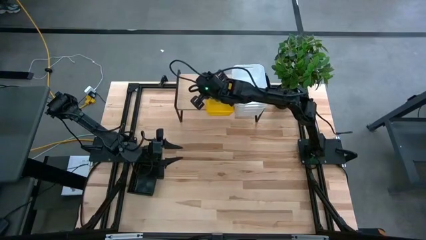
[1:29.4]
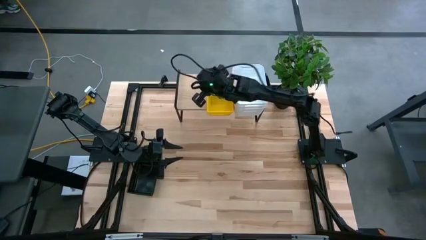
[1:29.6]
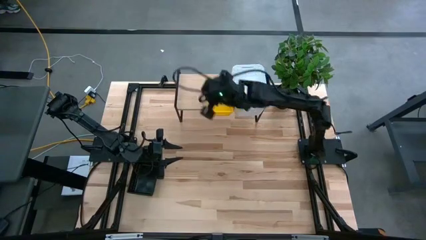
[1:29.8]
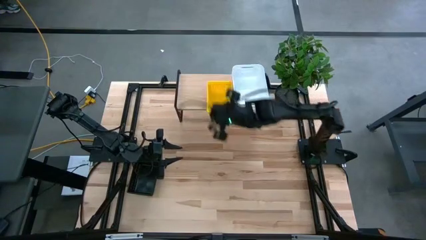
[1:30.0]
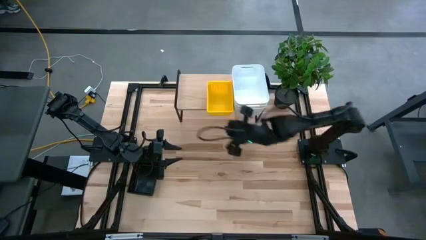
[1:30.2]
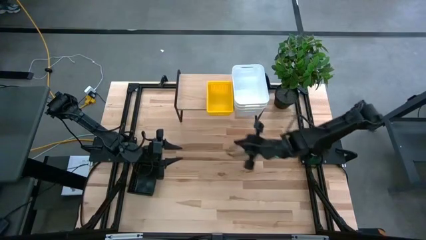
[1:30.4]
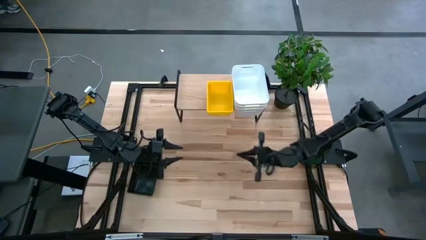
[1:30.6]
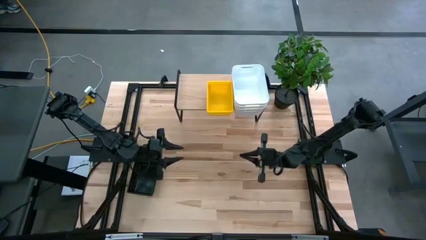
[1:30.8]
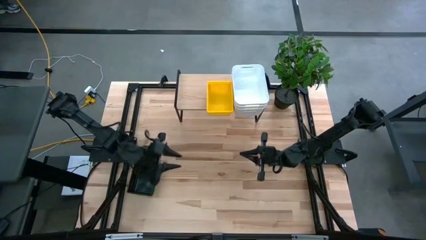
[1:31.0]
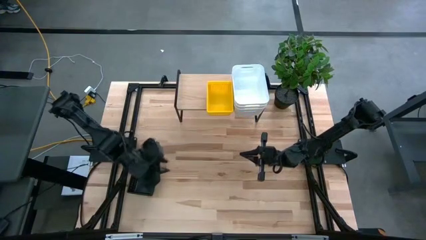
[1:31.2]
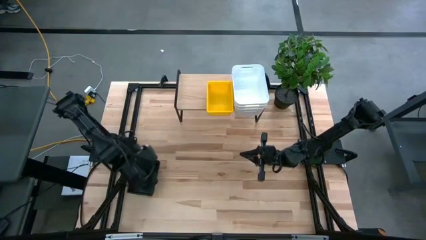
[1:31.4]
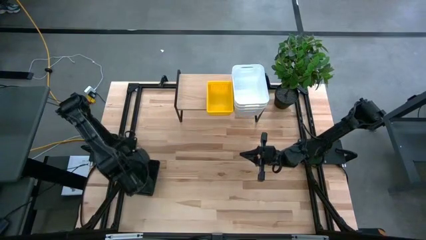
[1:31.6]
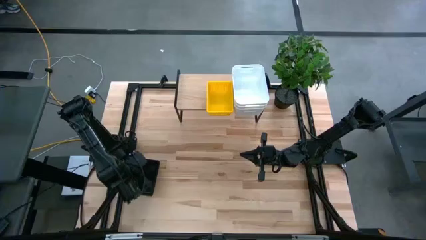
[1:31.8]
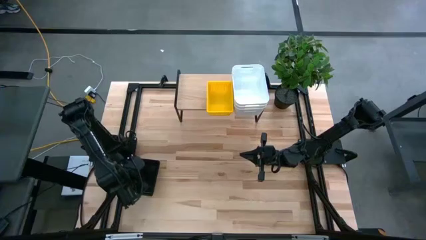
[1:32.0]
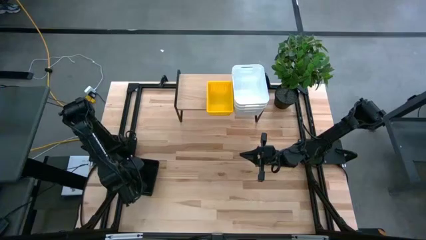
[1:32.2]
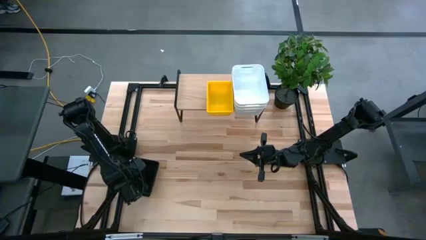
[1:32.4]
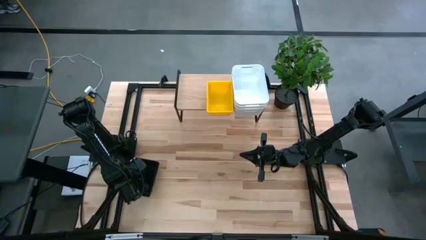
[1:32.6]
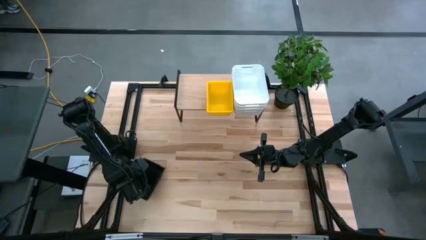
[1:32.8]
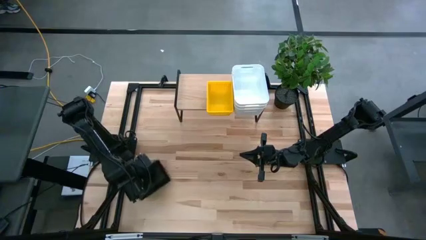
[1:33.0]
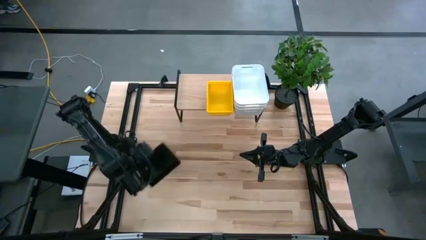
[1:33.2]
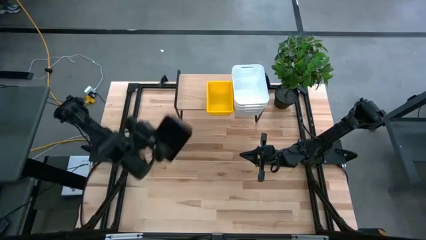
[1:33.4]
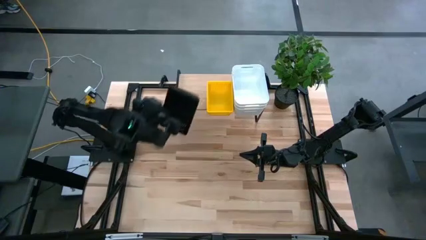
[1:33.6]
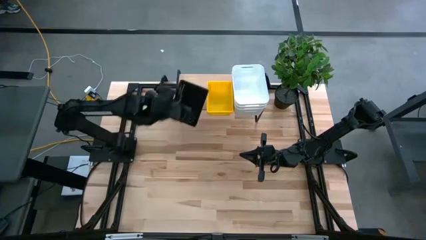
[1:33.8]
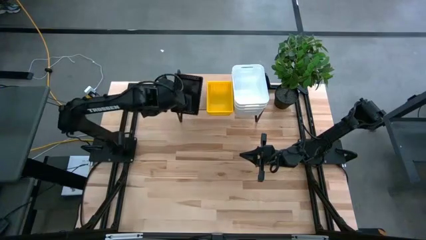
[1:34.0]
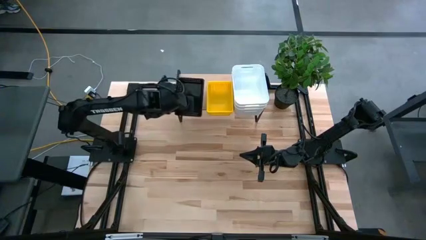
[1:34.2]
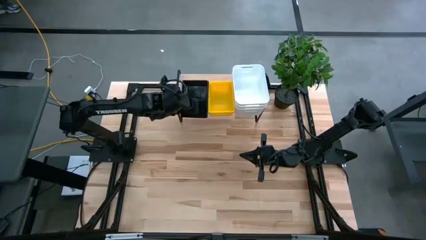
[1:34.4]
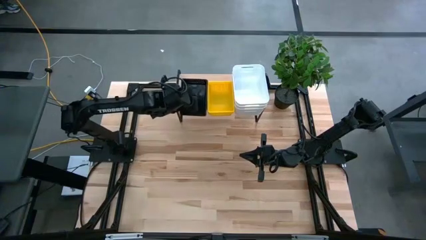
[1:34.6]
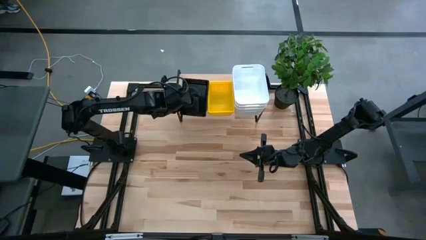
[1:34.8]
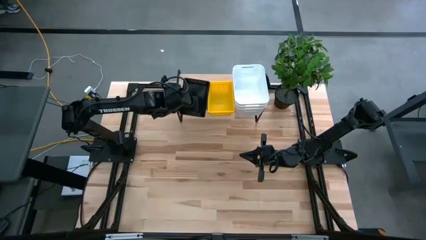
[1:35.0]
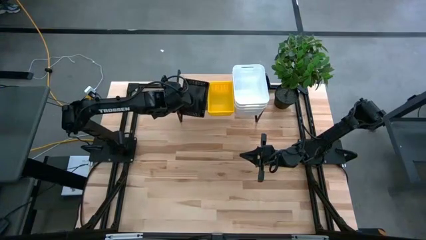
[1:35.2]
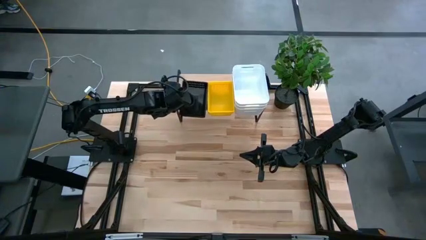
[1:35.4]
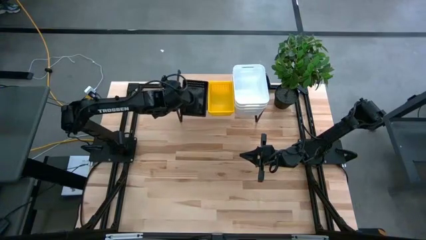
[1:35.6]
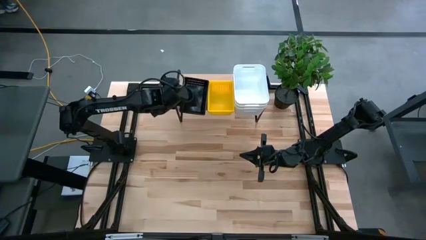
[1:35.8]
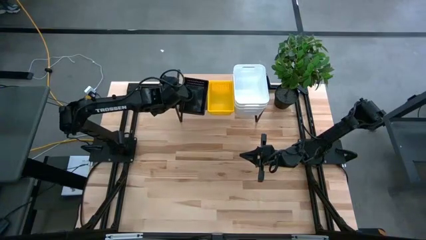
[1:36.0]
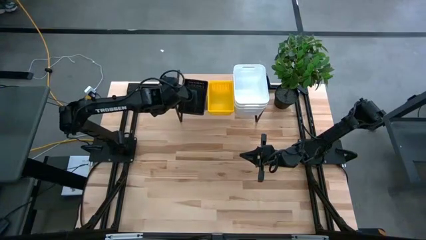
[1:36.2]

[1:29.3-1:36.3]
Task: Stack baskets on shelf by color
Put the stacked black bins on the shelf

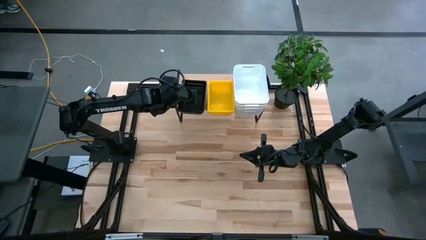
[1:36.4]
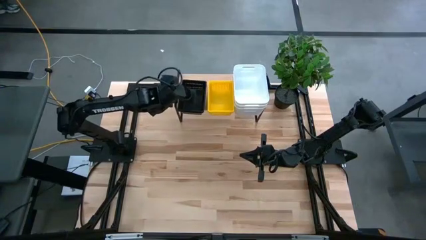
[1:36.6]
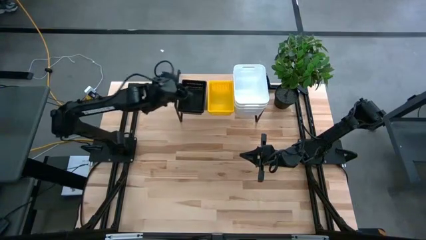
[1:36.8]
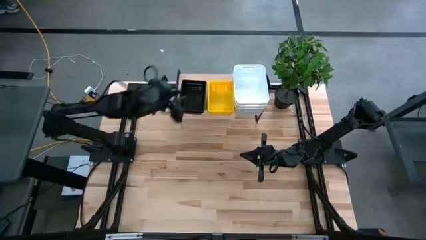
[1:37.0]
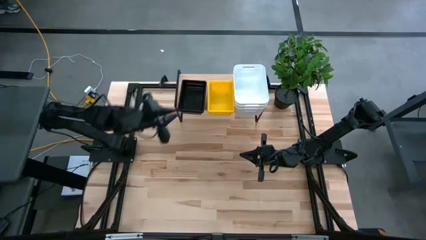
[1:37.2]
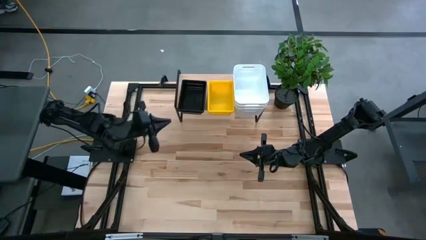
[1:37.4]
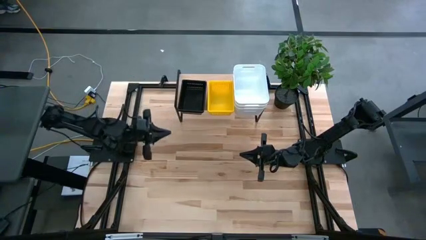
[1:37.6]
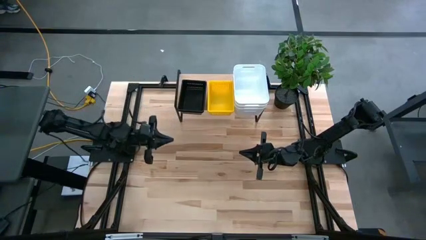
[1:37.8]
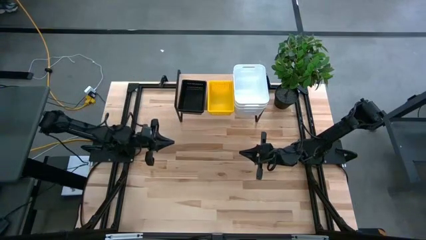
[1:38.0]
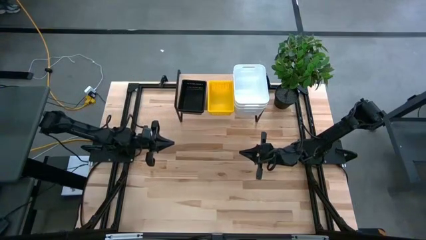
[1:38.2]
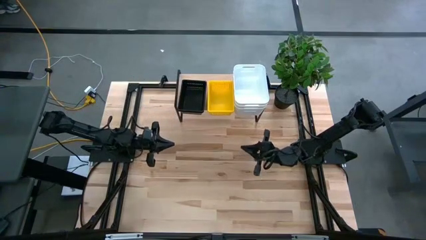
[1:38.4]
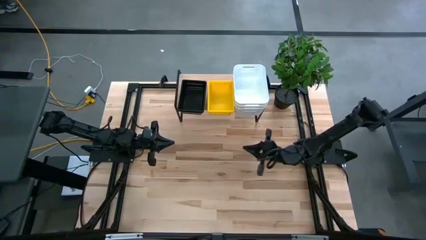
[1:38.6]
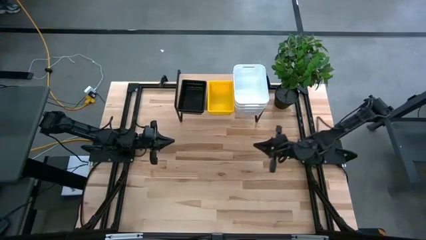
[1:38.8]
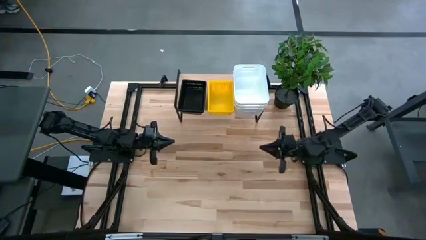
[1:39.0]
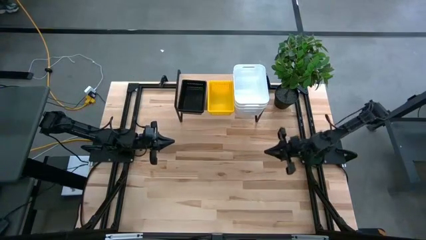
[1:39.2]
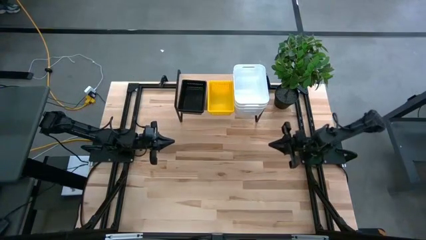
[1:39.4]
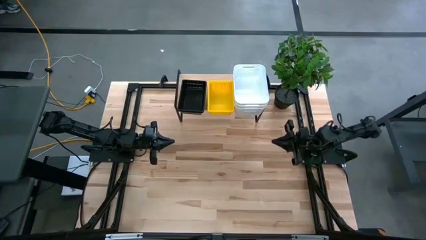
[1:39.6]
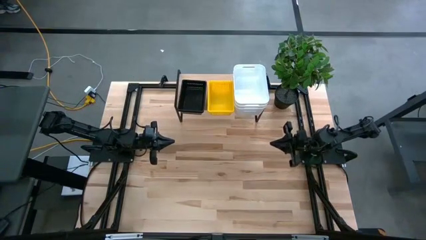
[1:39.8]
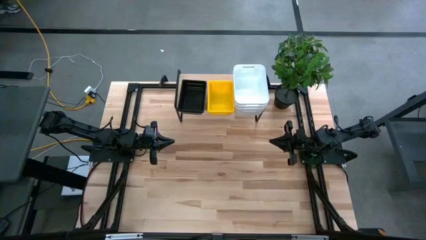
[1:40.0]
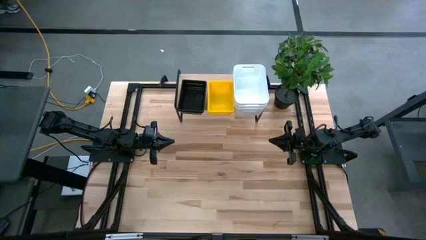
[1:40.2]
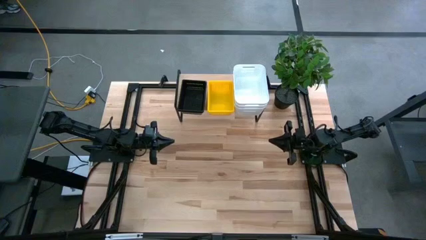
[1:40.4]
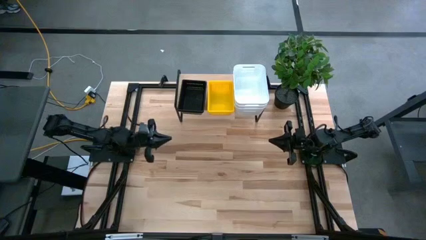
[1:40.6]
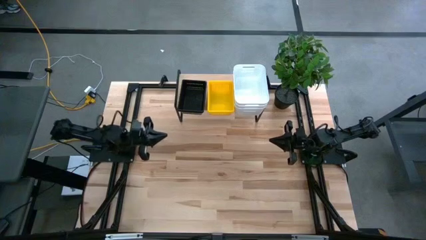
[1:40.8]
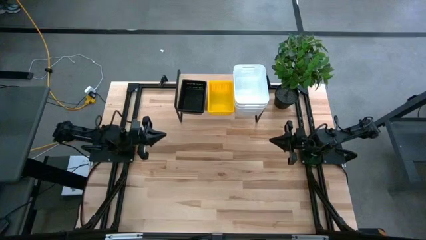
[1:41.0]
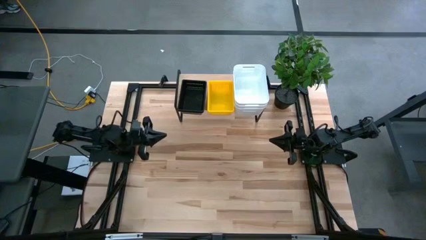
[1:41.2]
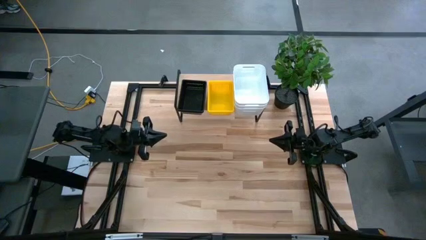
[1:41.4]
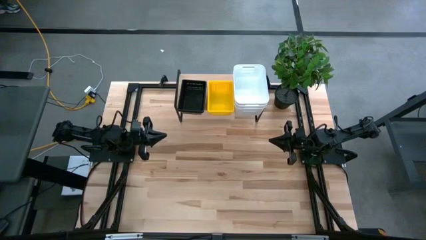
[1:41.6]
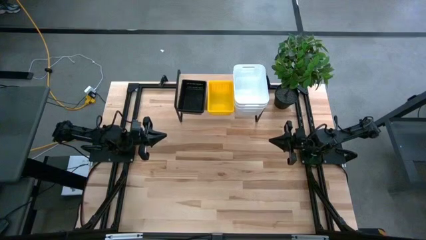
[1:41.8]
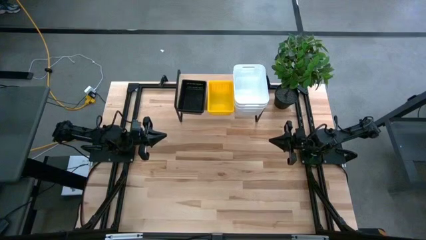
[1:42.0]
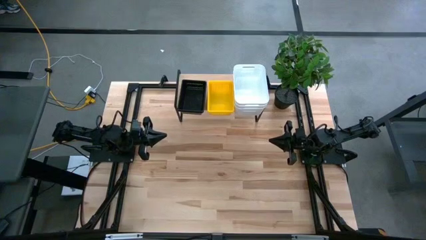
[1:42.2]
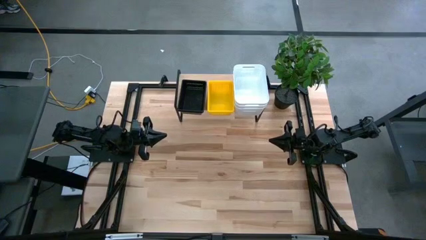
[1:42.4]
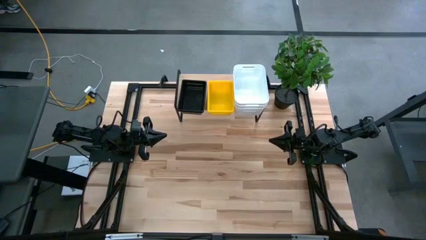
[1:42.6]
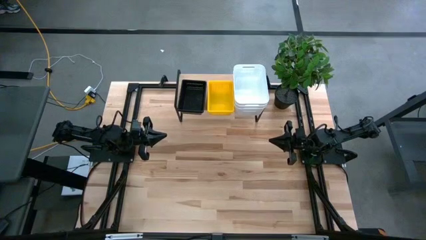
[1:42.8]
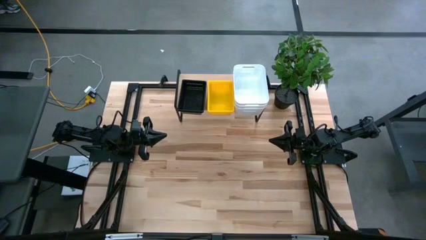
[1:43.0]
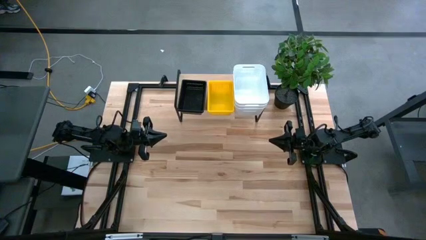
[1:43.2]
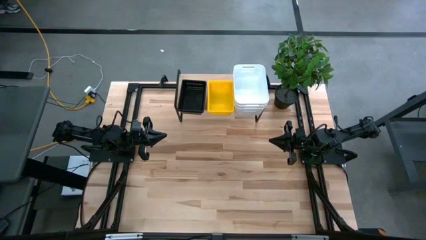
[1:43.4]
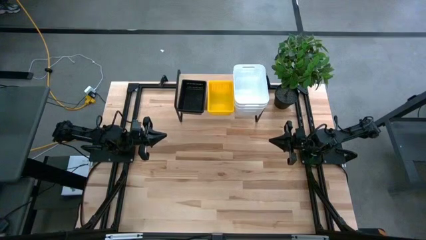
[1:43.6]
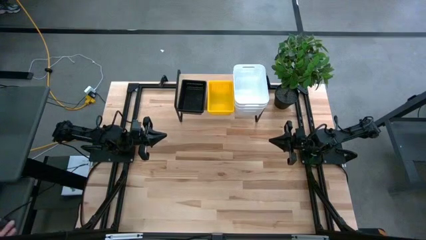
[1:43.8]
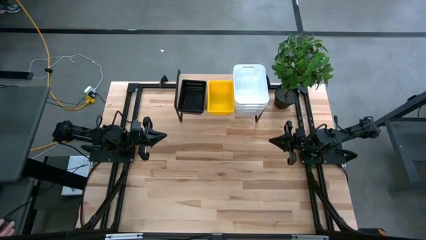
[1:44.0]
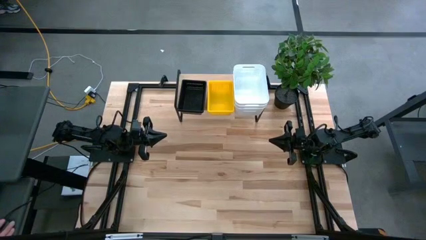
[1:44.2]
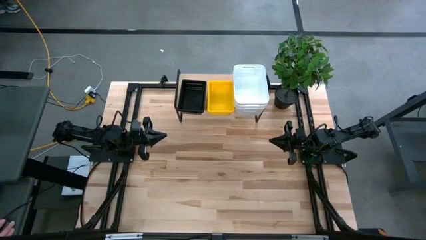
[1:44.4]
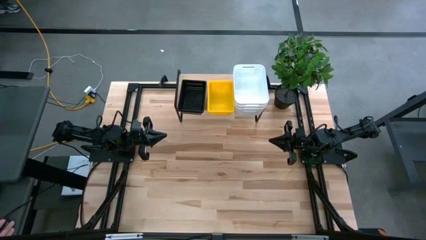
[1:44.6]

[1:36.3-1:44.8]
Return to Home Position

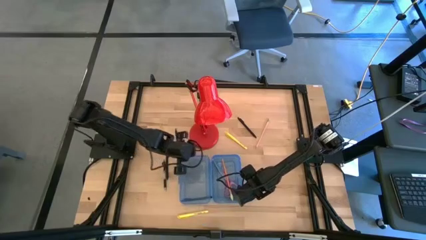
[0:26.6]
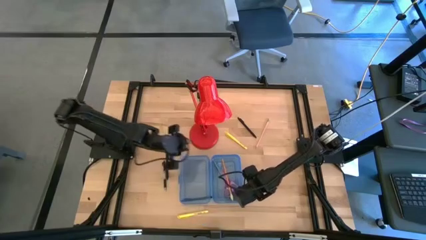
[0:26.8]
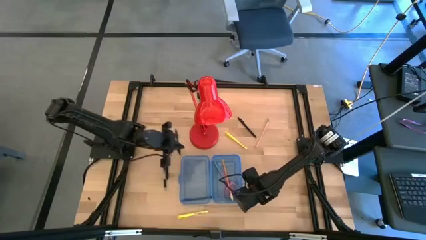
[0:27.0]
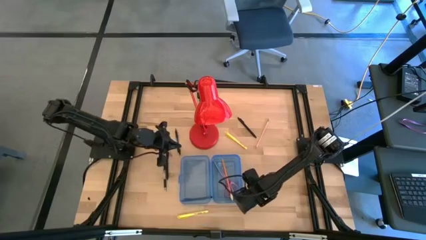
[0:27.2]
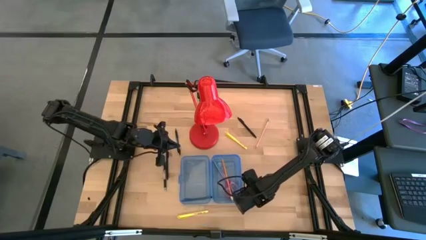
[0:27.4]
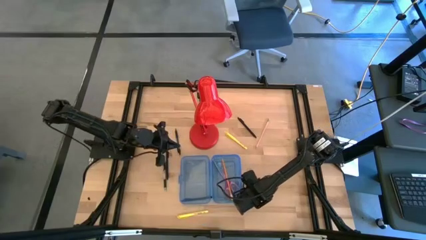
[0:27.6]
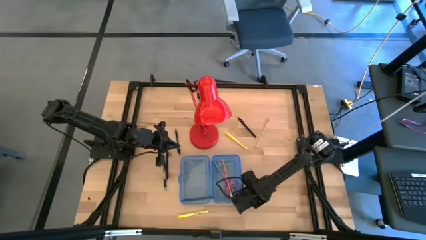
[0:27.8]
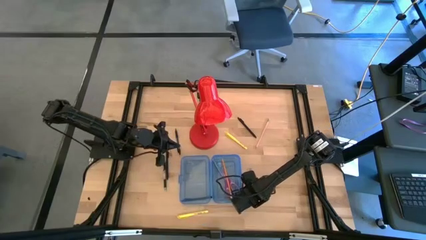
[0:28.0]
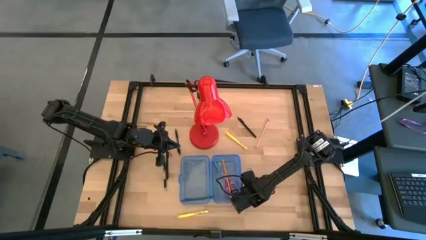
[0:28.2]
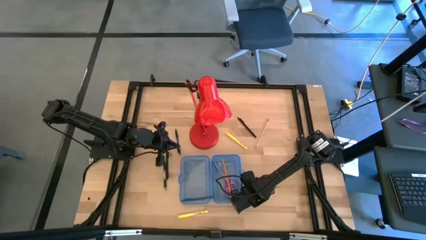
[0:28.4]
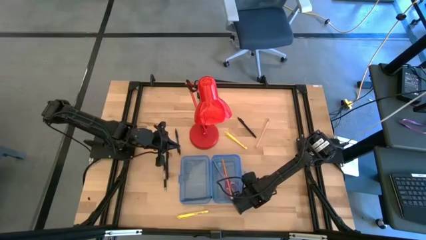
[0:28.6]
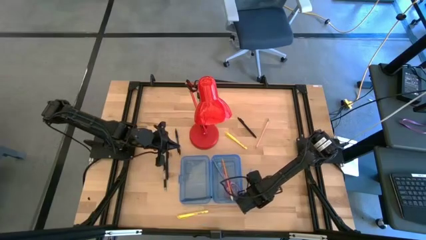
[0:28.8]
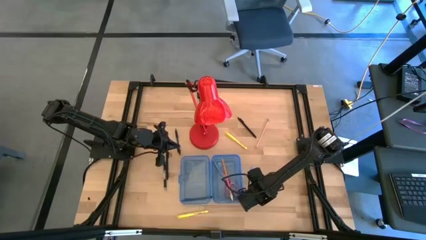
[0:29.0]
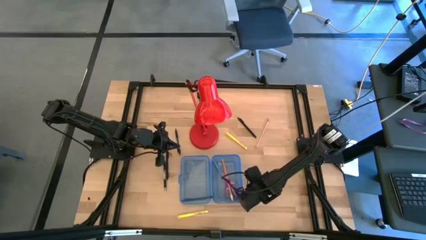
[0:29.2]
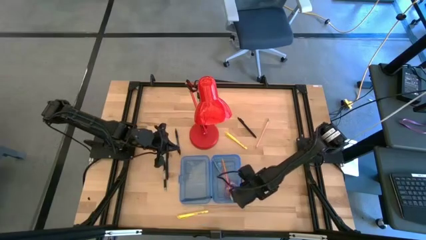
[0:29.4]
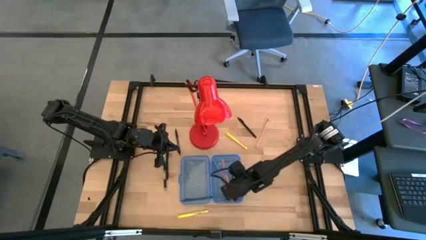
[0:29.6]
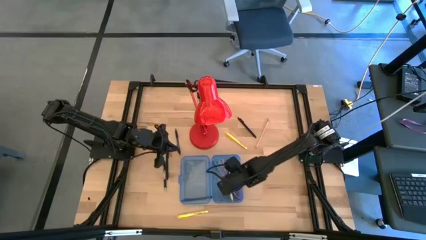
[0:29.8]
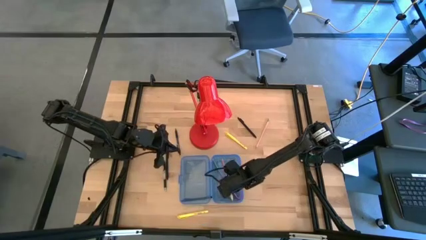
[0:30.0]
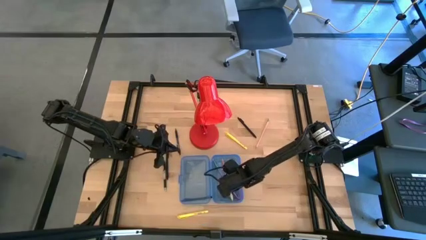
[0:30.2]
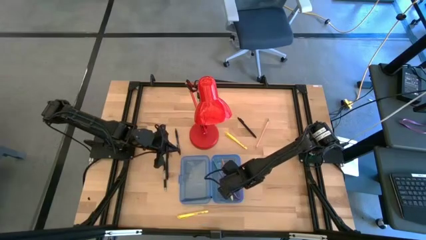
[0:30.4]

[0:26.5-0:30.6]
Task: Pick & place school supplies into a supply box
Put the blue pen into the blue supply box
